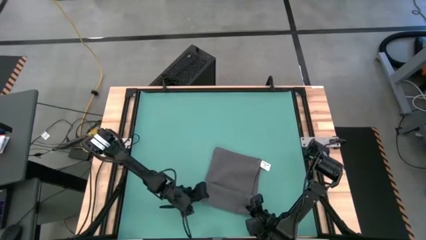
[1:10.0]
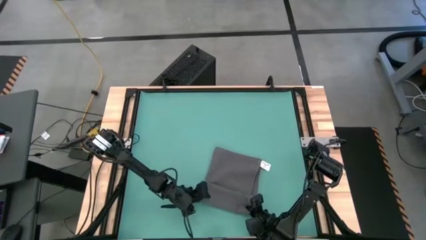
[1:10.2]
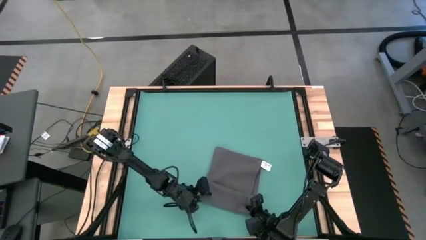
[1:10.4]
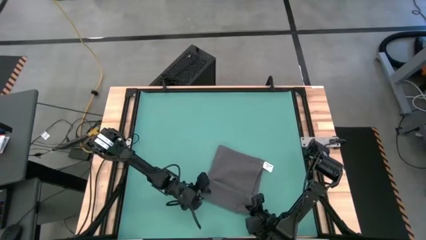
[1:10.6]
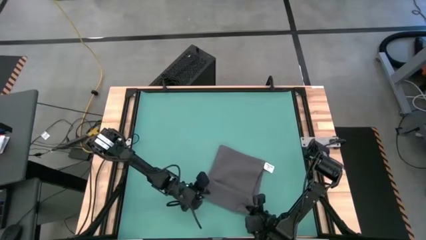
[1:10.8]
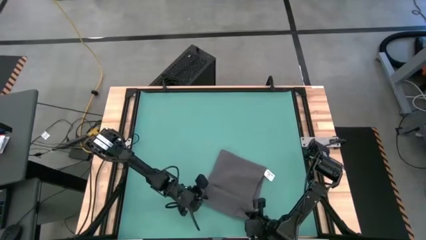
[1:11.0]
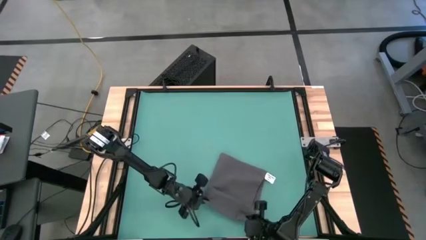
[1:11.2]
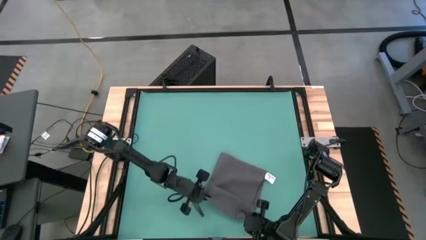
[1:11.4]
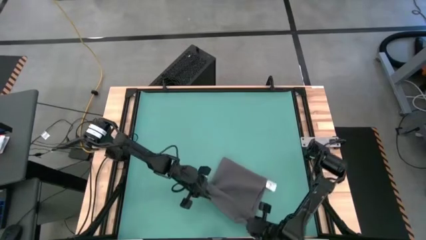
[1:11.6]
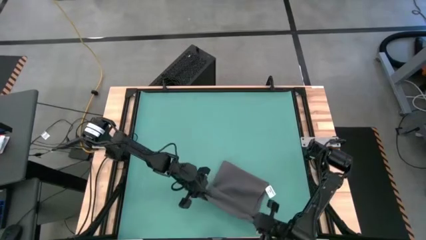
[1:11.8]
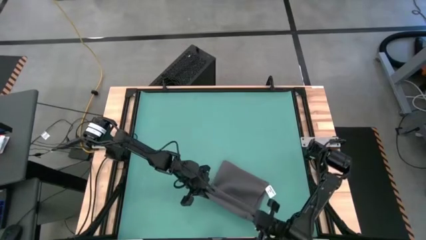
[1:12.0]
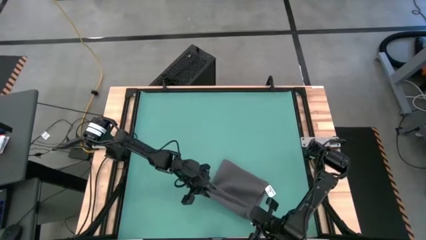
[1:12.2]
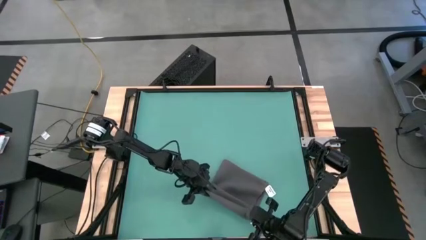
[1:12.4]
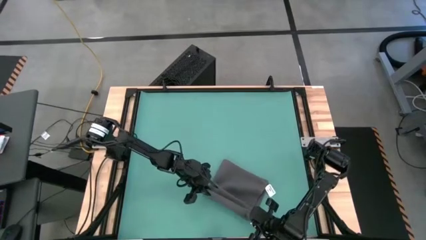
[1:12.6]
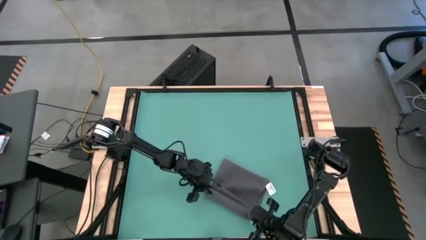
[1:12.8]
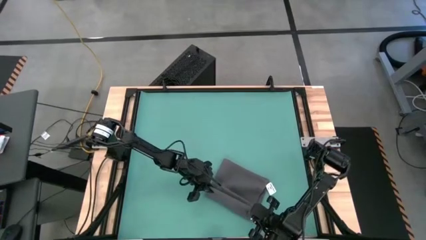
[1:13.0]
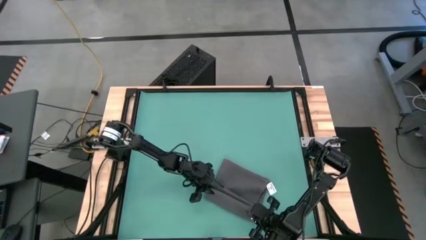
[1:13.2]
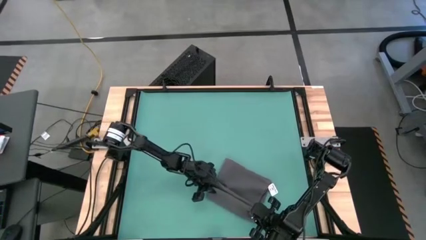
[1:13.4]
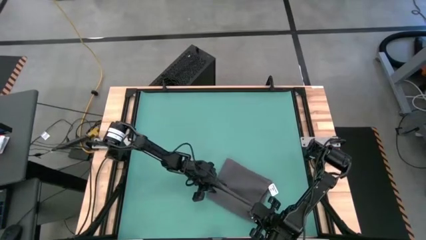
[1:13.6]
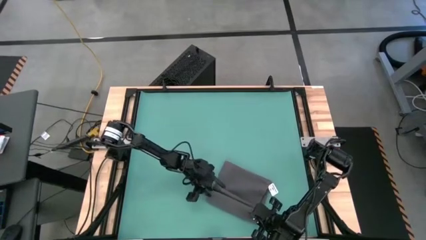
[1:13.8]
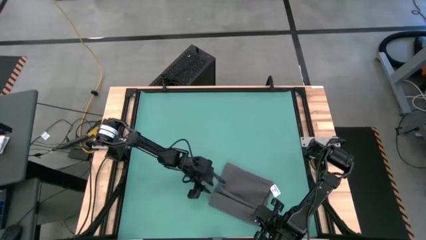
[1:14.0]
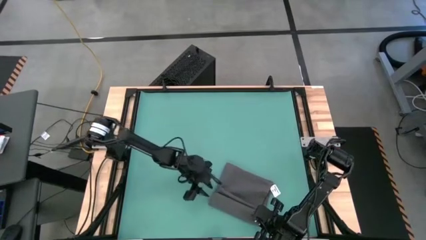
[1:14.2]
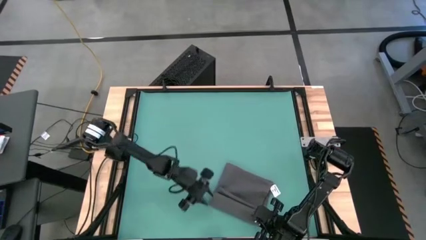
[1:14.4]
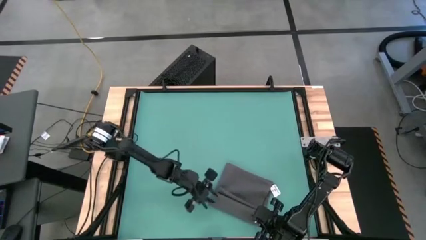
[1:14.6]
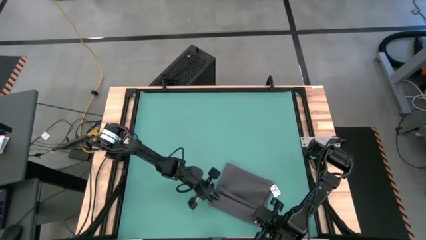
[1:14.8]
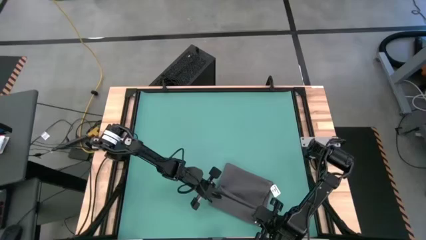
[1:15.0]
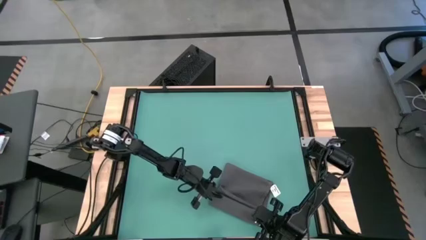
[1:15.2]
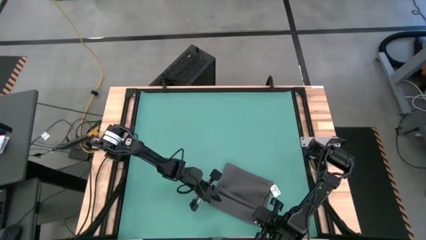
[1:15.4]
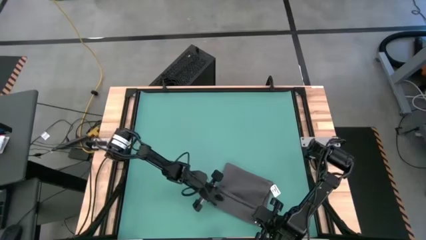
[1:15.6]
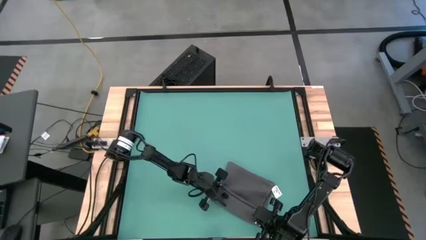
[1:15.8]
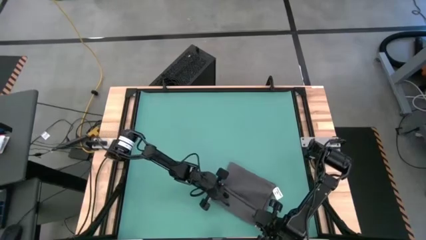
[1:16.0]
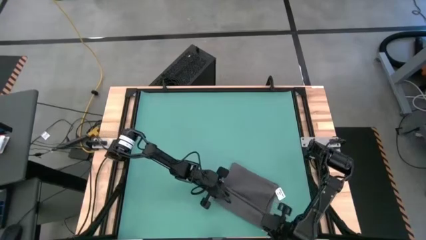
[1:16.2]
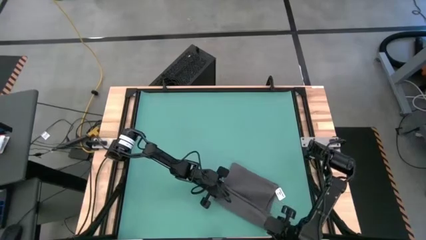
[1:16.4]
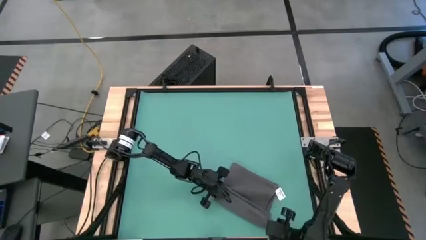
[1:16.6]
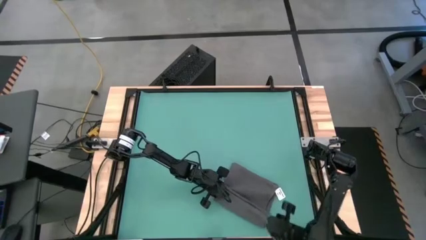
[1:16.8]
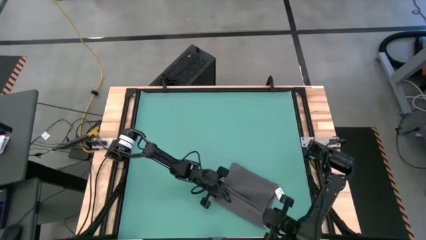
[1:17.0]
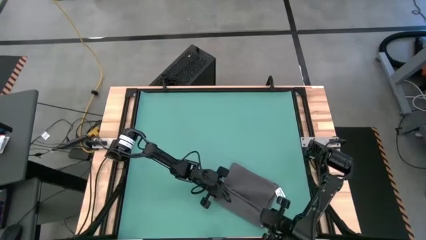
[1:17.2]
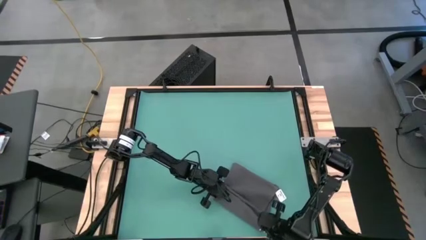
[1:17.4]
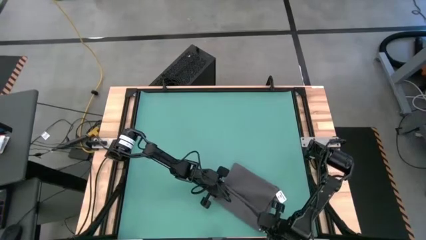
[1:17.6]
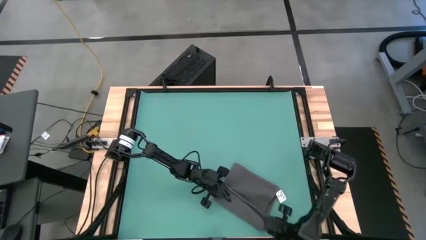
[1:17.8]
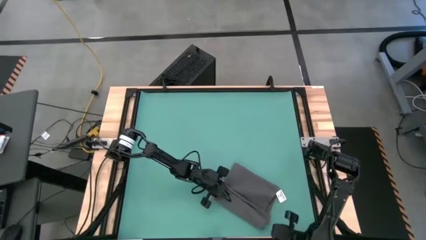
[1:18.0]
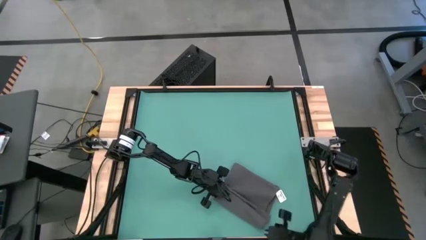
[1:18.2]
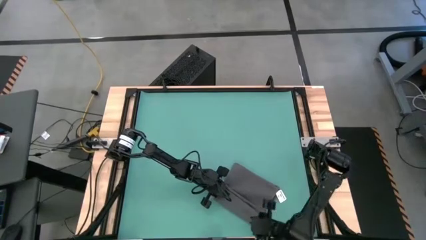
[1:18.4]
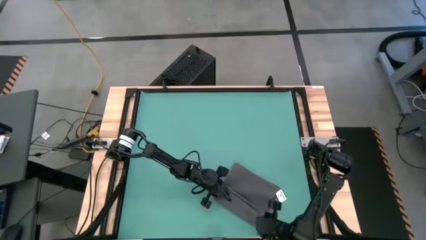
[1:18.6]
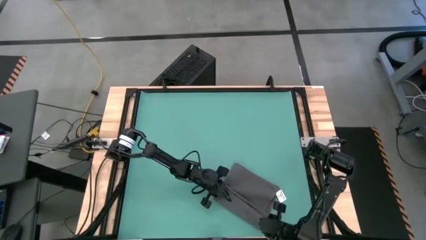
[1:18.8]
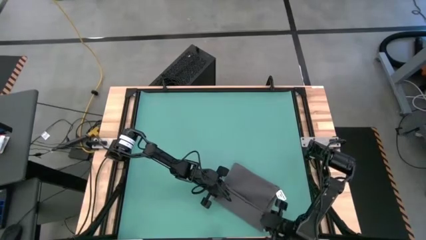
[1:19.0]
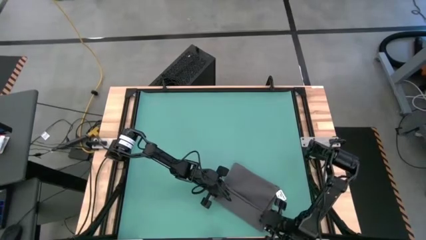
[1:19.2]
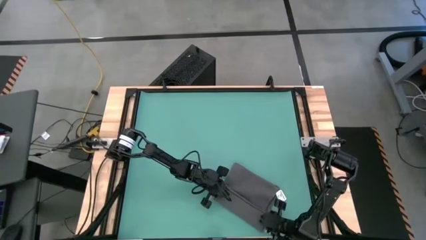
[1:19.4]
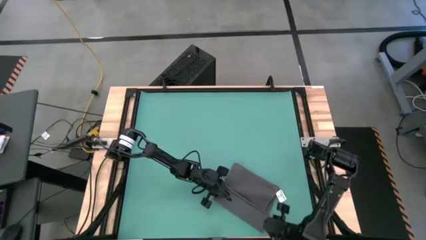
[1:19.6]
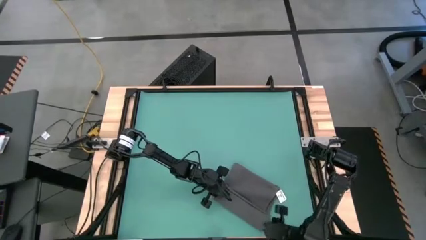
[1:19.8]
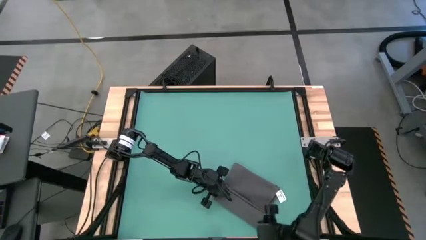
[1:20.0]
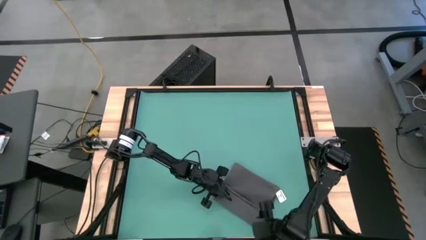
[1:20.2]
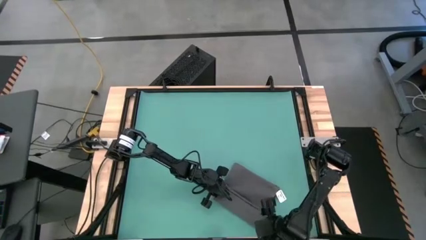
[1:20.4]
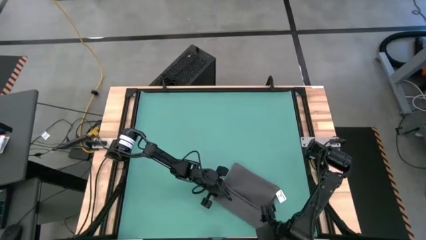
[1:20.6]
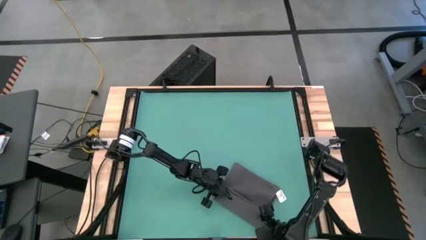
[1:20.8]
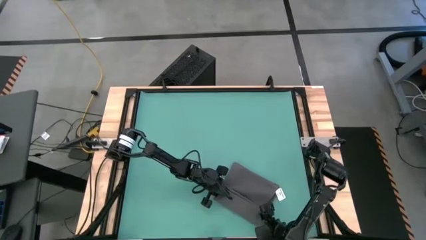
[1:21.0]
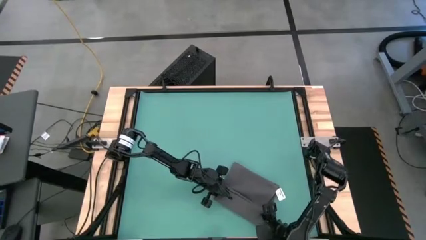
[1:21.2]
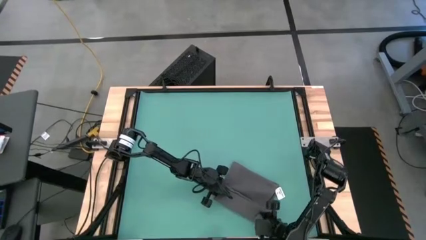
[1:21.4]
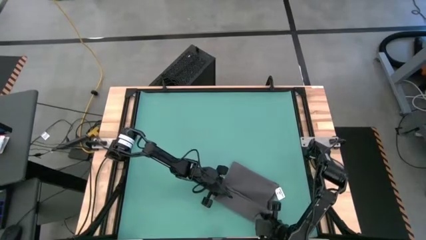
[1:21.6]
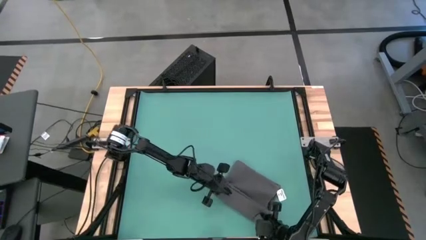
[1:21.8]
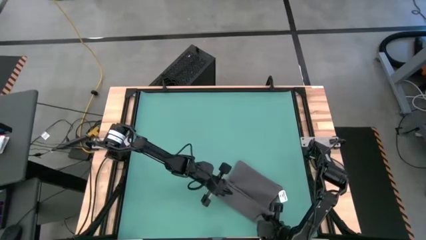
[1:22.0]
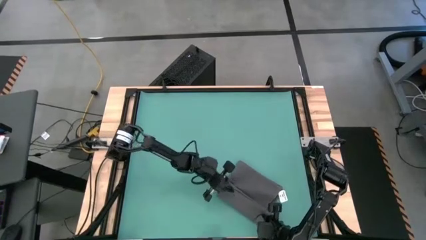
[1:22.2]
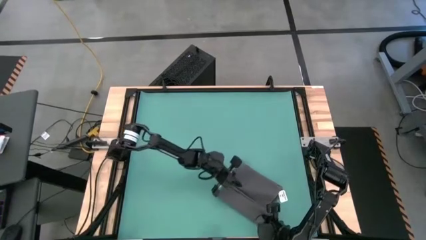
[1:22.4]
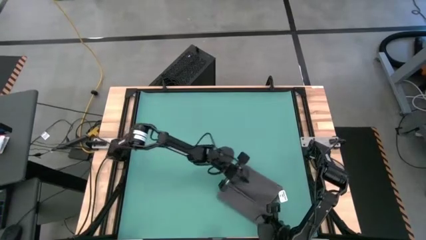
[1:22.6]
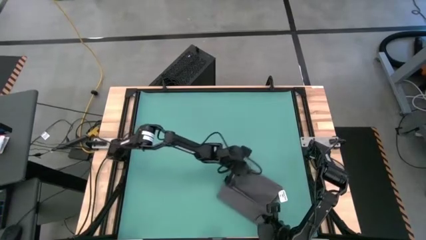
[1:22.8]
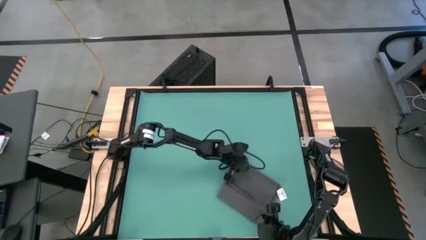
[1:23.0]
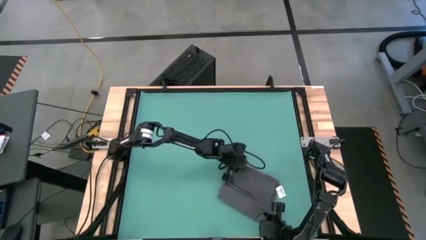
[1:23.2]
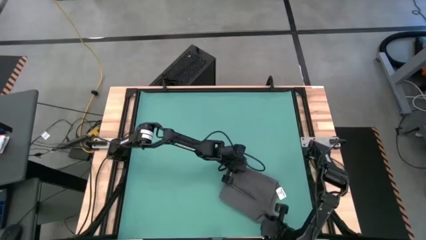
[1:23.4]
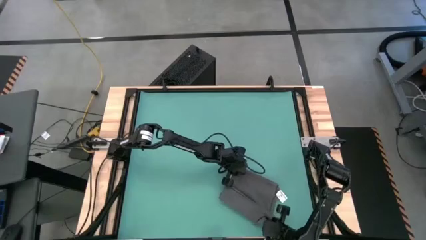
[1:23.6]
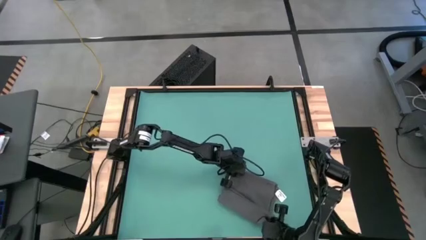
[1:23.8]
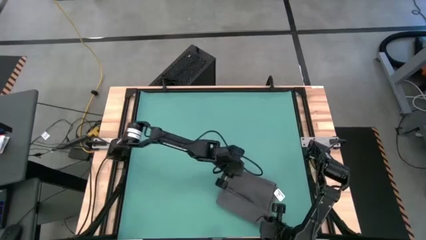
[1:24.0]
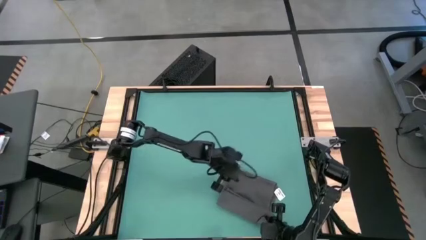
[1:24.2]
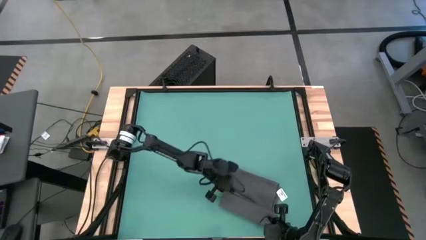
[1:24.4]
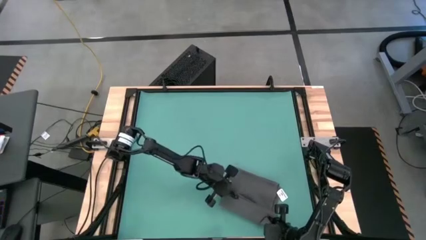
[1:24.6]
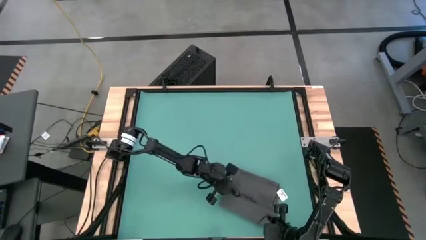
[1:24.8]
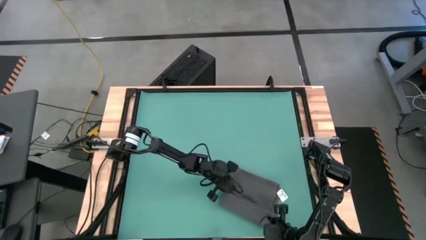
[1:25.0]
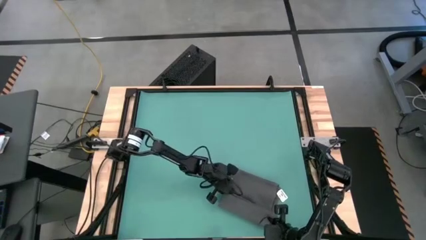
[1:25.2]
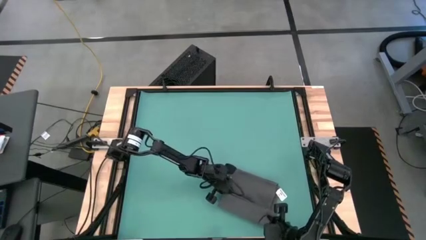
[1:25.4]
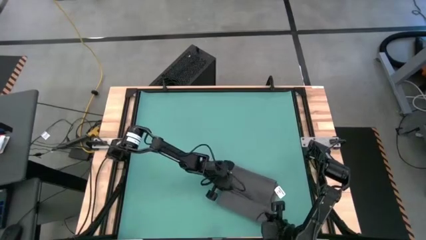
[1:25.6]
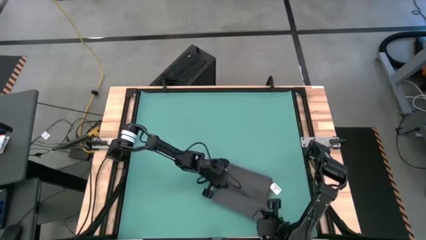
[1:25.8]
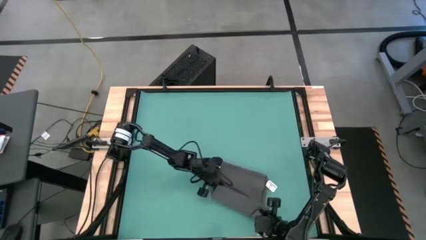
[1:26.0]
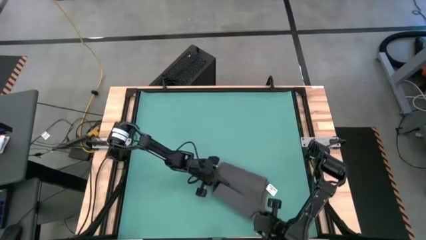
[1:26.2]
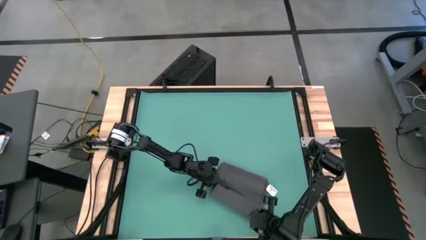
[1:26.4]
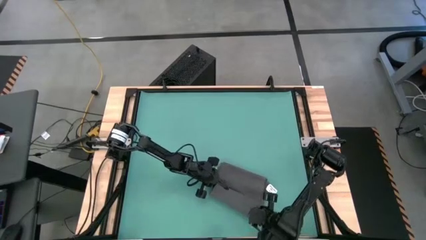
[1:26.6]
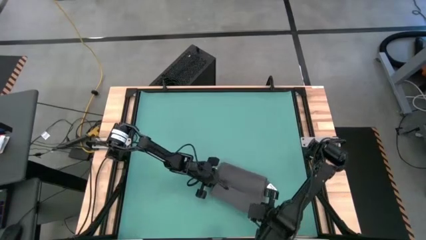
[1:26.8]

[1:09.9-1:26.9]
Task: Roll towel into tight, uniform cylinder
Roll the gray towel
